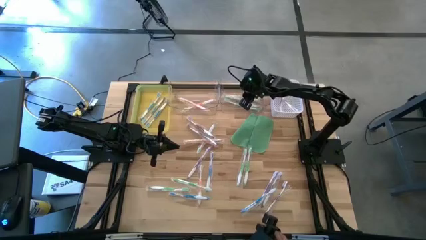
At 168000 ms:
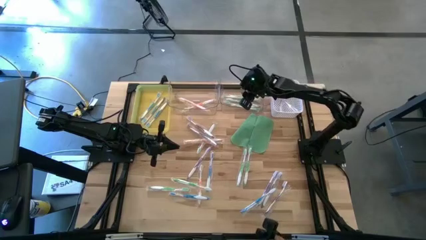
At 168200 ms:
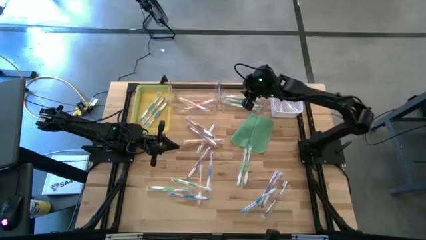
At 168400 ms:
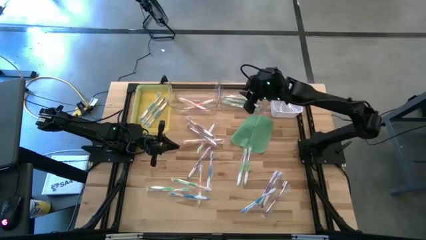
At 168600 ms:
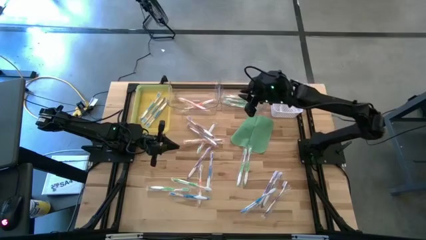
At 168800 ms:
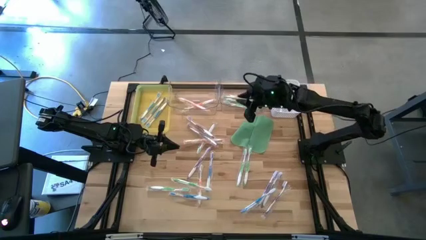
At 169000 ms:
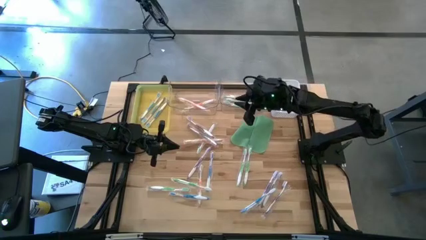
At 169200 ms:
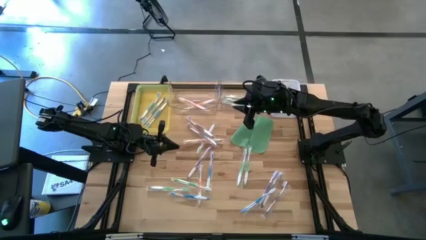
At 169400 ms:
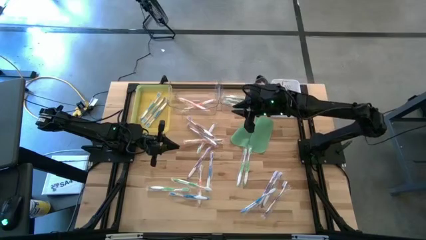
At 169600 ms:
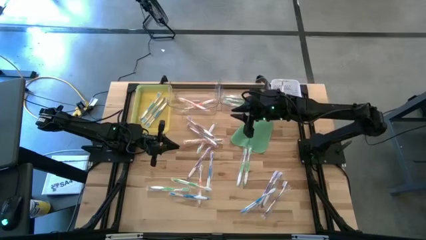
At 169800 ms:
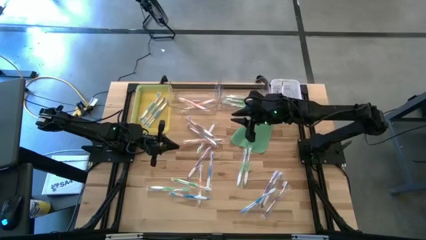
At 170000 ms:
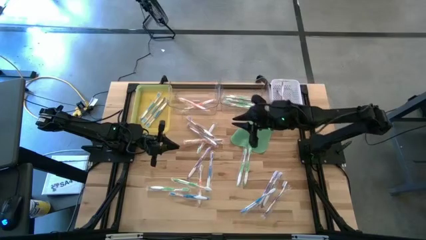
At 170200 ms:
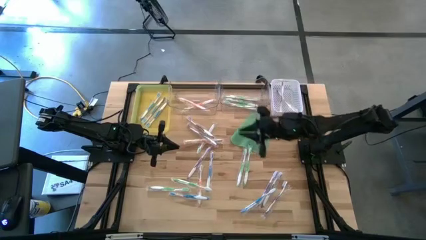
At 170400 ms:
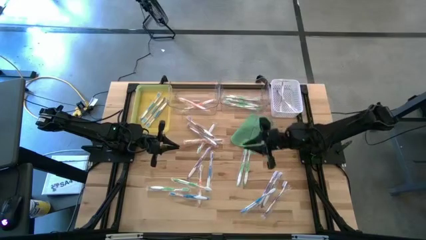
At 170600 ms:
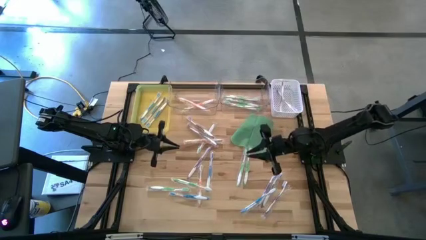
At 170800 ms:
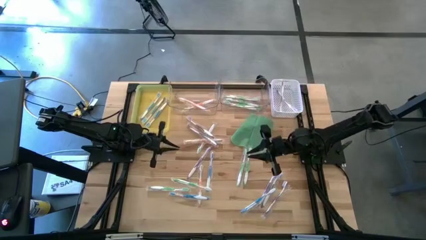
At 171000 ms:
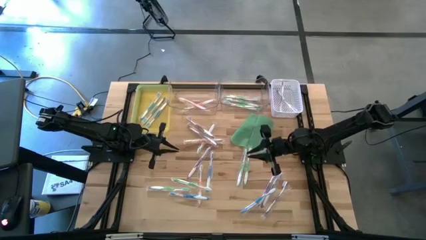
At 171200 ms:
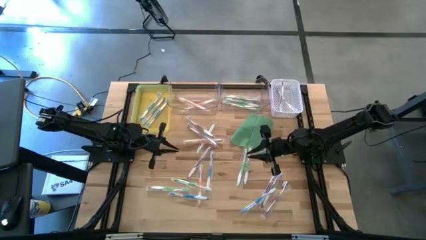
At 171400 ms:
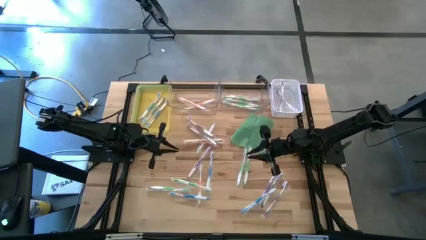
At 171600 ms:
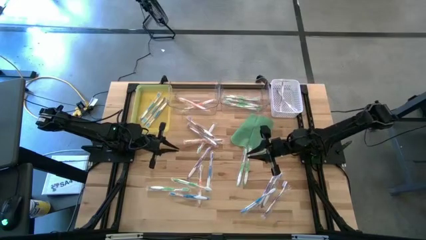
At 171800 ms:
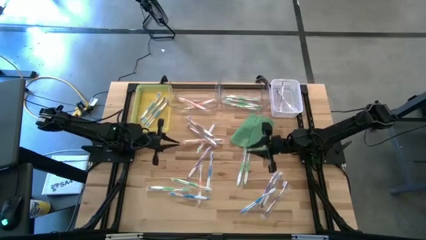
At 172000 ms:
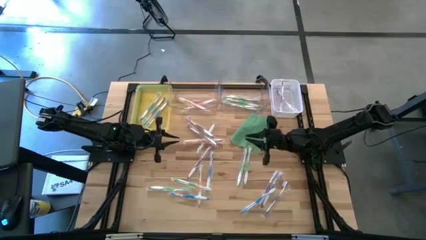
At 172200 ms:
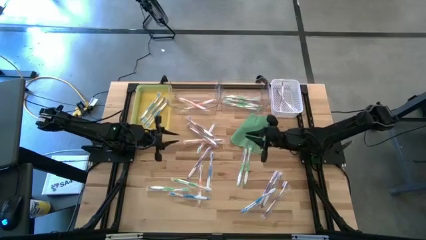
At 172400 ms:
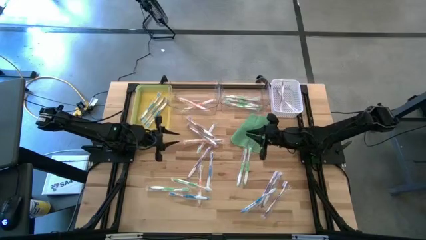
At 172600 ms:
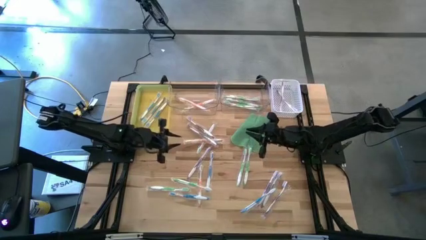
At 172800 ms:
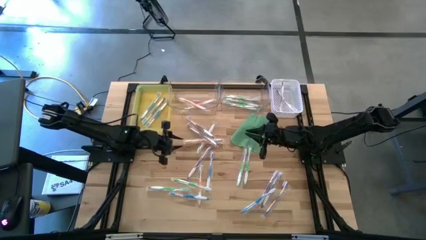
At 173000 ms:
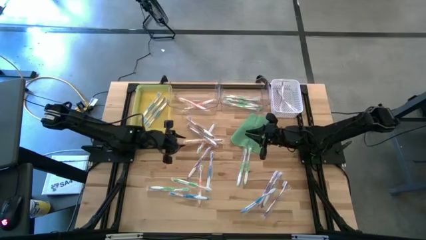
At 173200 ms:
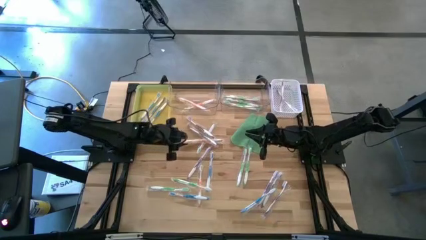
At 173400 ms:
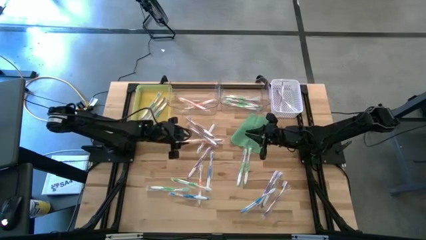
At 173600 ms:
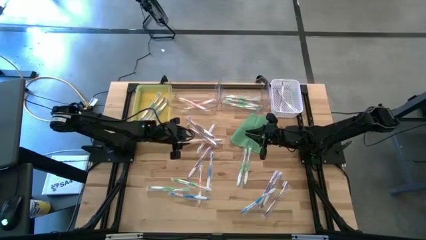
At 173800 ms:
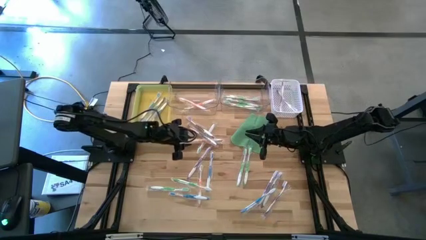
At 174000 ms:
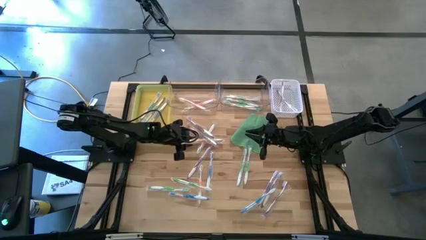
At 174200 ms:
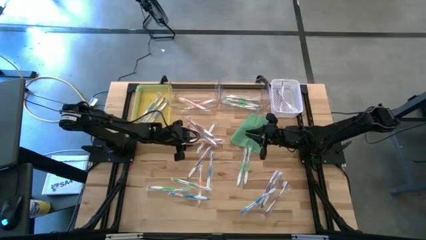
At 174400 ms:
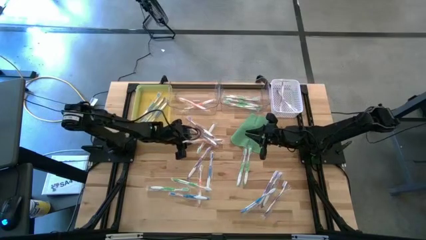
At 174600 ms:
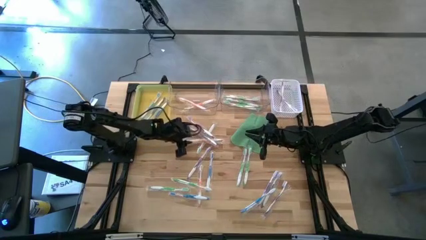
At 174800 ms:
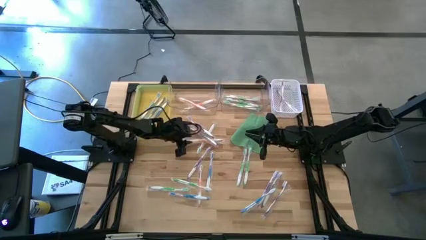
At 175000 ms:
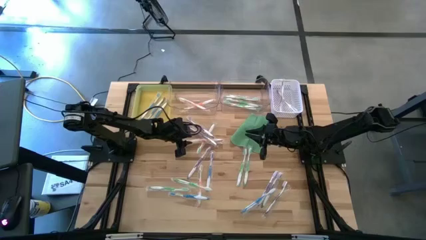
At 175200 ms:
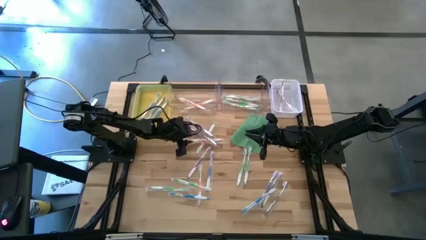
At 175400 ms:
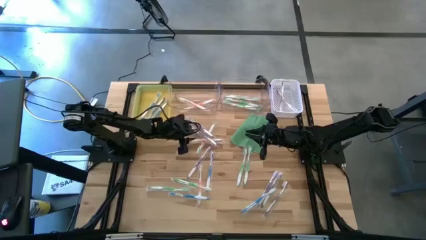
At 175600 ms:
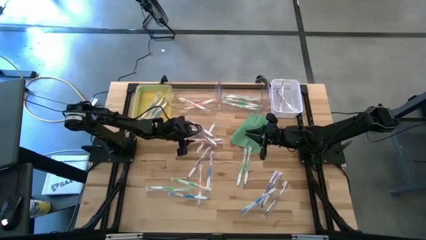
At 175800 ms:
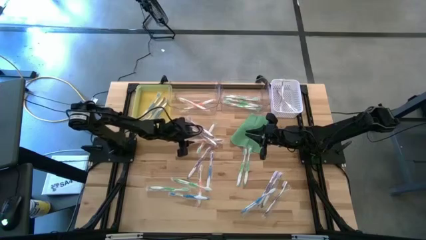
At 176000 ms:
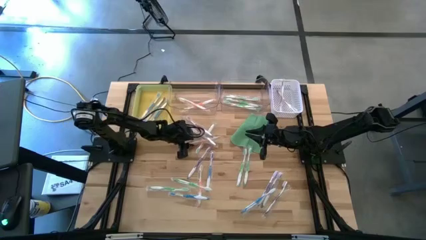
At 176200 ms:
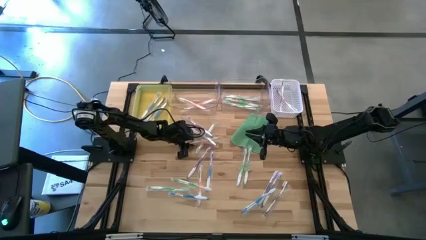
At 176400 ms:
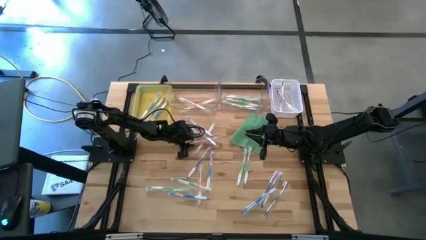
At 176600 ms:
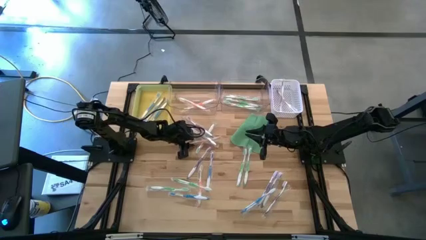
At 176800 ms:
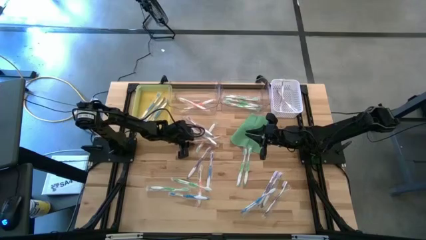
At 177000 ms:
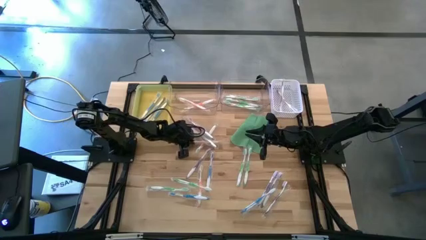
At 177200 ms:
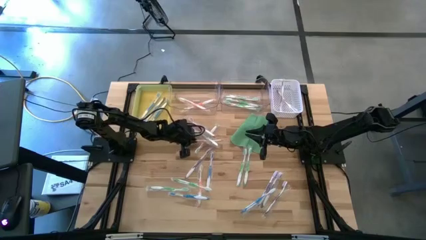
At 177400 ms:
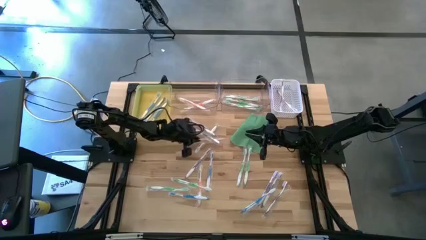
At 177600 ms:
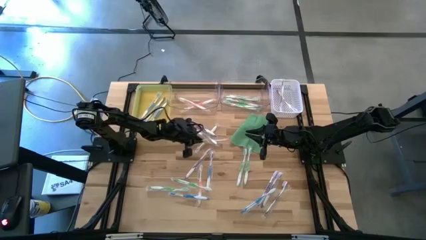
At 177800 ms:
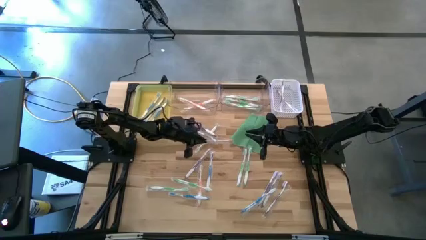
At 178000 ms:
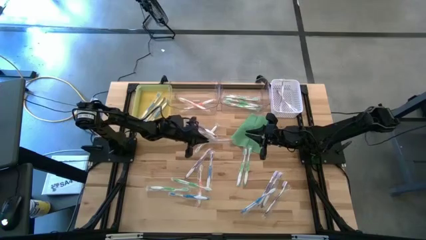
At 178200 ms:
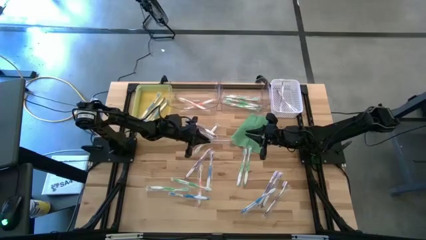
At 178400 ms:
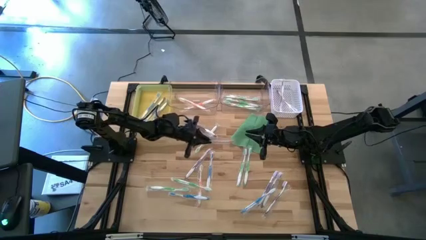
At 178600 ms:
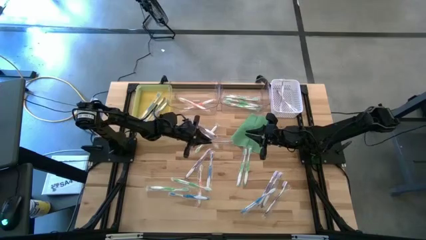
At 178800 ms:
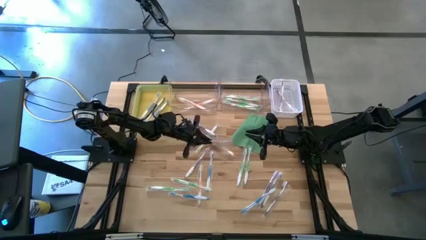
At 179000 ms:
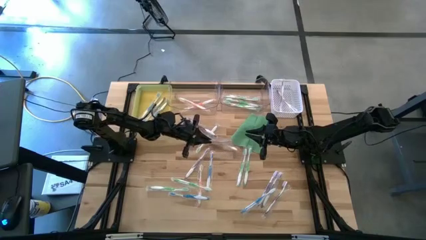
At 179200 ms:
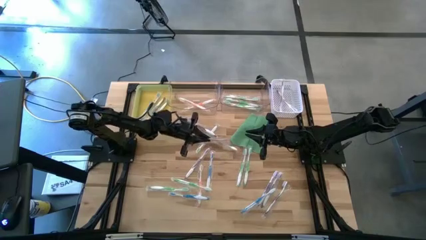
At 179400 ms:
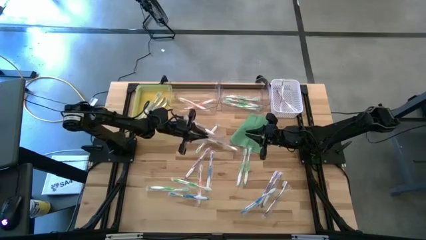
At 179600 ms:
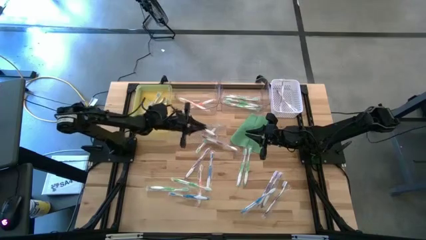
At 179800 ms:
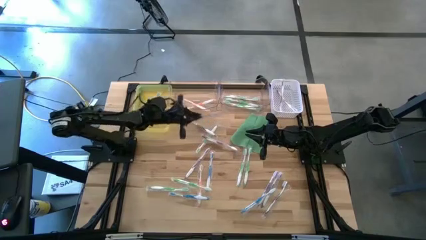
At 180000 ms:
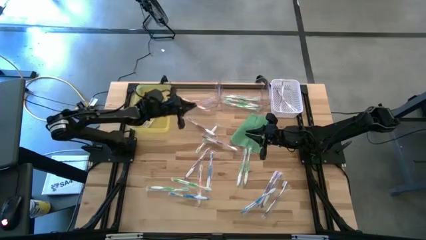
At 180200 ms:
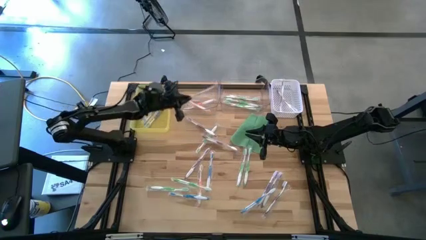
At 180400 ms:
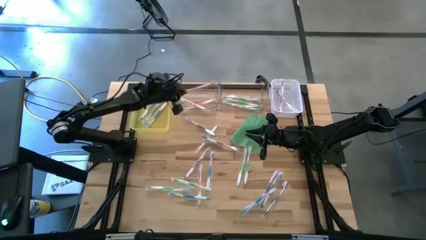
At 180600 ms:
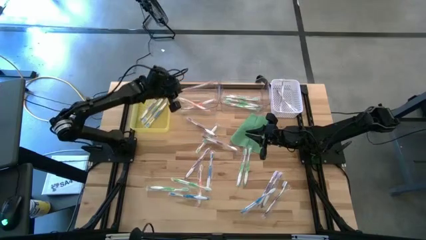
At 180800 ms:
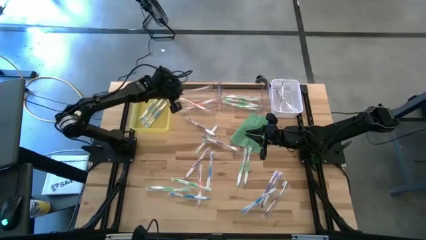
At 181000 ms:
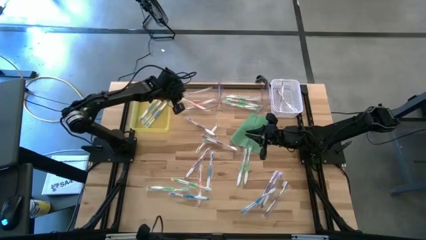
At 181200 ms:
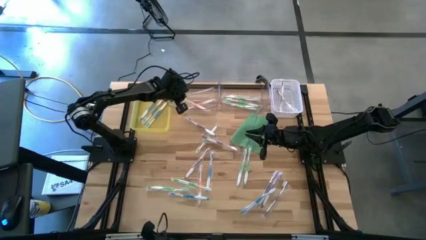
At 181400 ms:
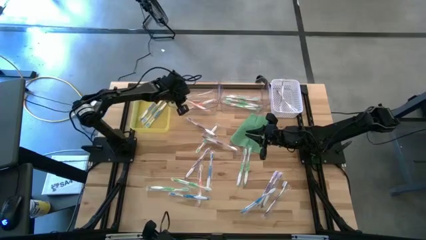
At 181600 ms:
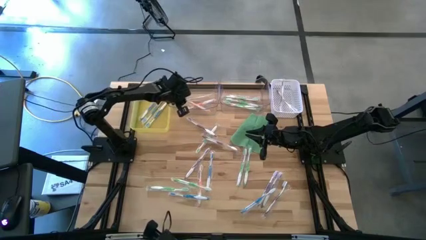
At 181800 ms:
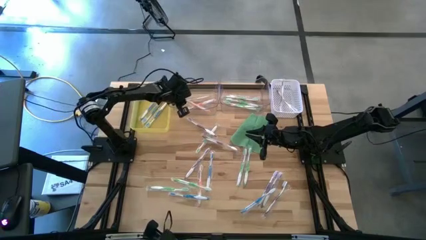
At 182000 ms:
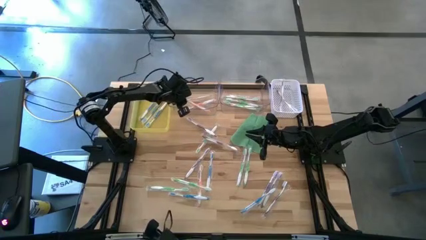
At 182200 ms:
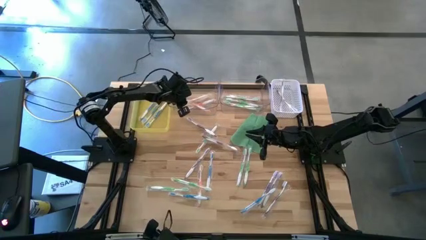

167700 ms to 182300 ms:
Task: Pick & Place Toothbrushes
Put the orange toothbrush into the left transparent bin

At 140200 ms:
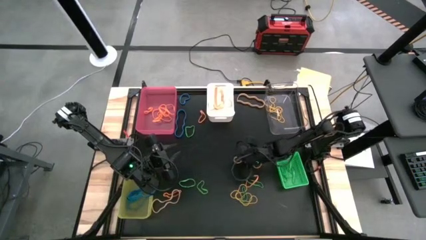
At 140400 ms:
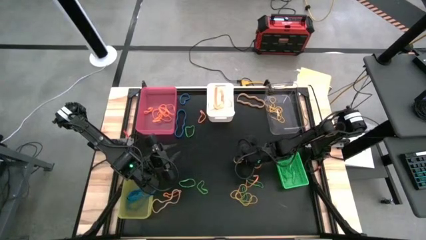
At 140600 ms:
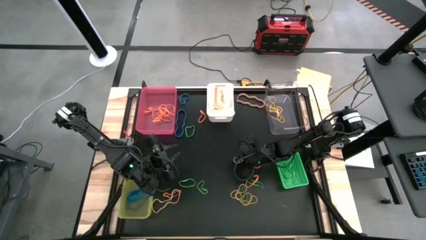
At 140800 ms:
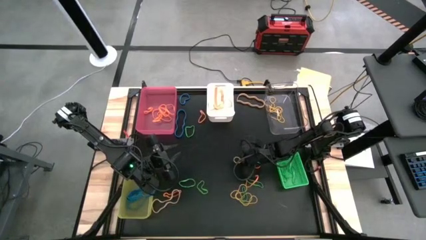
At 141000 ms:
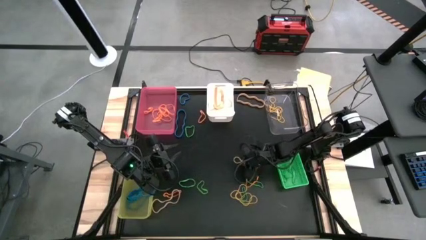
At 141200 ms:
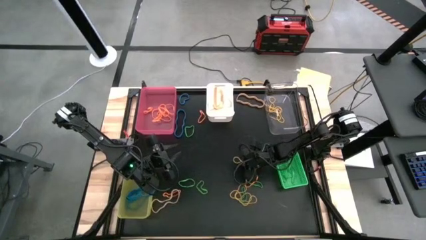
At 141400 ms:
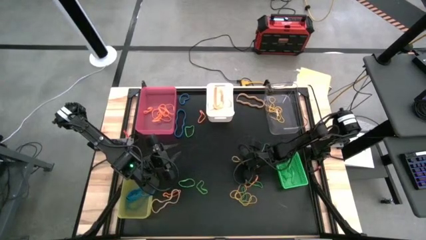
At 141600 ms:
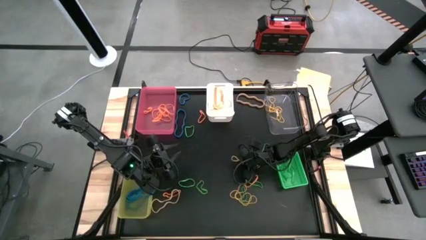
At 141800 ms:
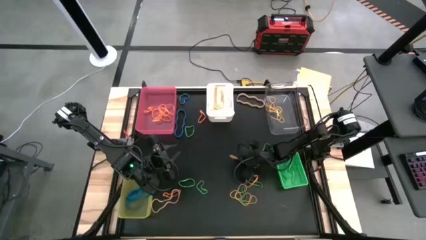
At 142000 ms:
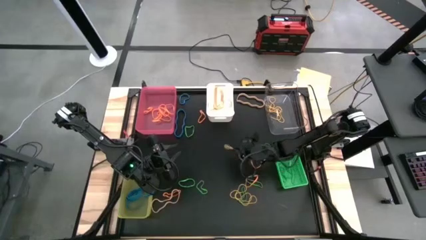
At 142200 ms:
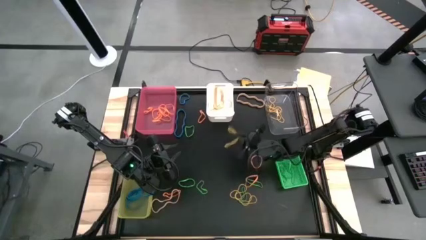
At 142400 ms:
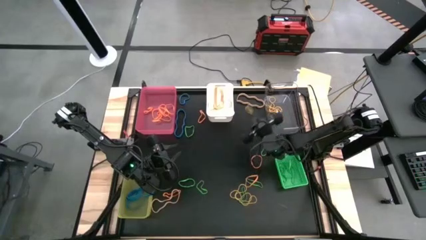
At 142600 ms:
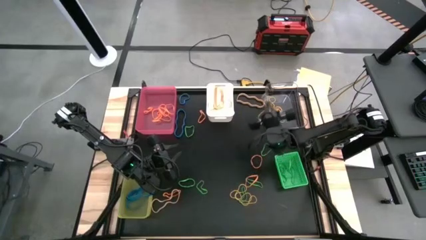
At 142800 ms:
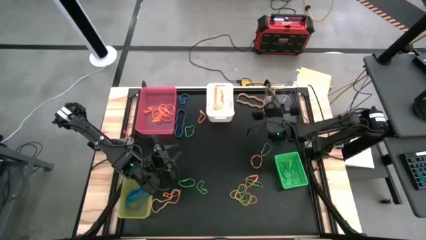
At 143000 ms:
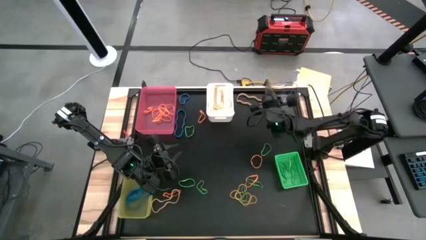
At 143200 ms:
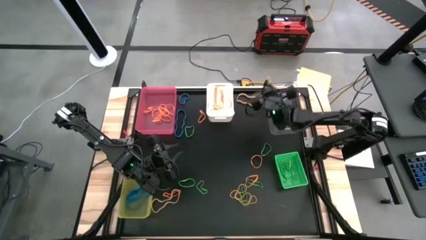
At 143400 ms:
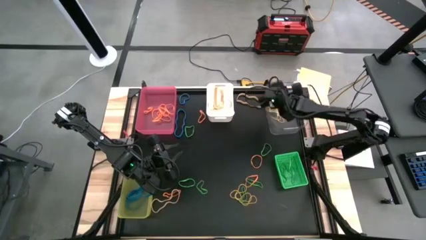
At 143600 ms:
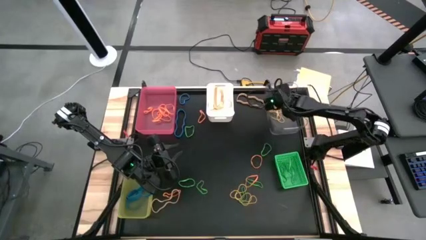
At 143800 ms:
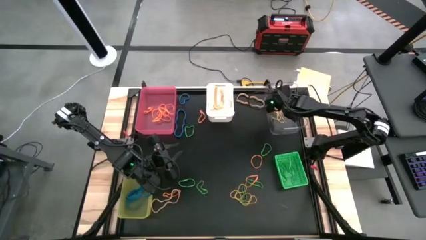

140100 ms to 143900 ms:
Task: Sort rubber bands into baskets
Put the yellow rubber band into the transparent bin
